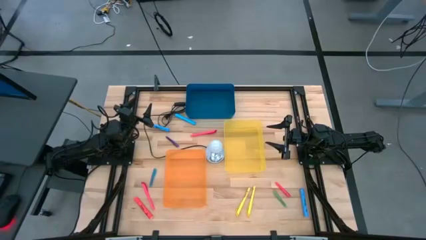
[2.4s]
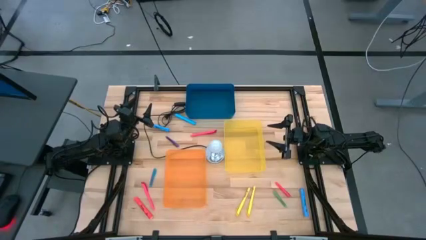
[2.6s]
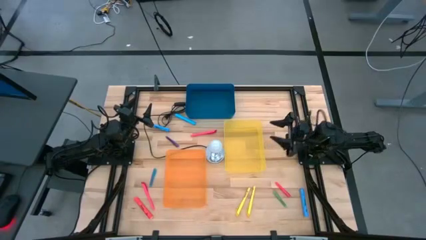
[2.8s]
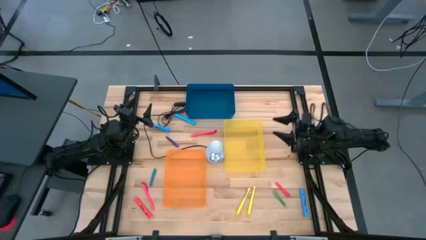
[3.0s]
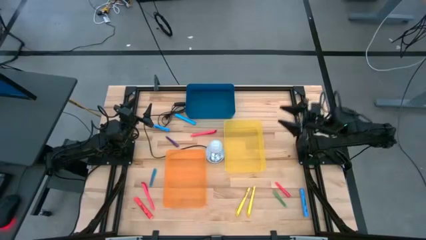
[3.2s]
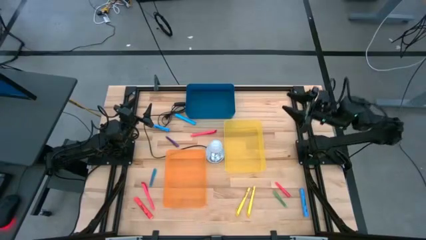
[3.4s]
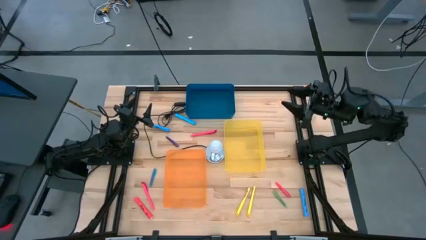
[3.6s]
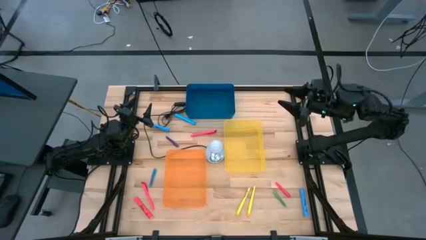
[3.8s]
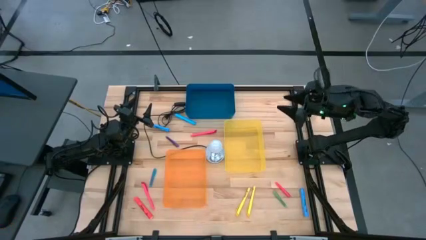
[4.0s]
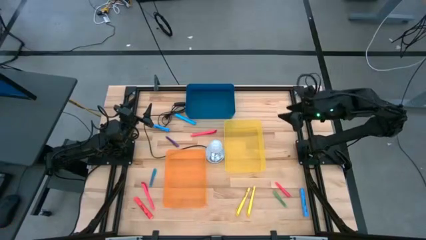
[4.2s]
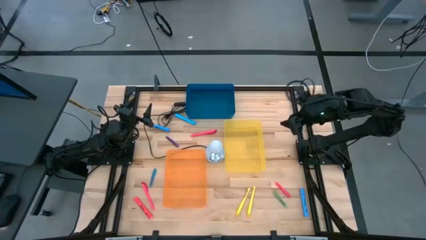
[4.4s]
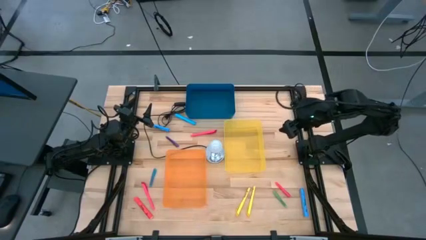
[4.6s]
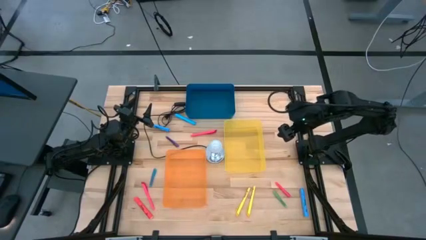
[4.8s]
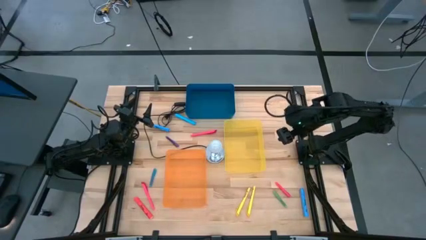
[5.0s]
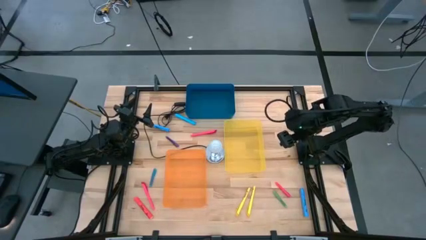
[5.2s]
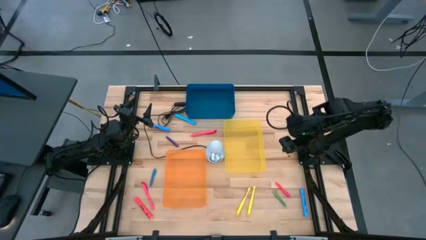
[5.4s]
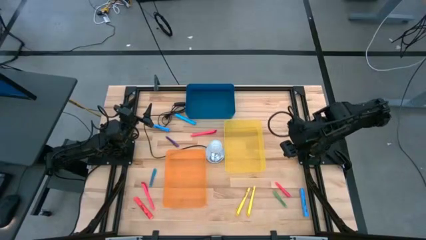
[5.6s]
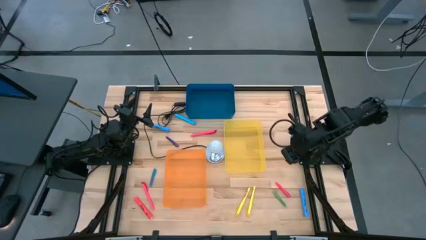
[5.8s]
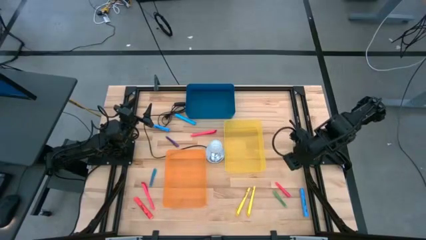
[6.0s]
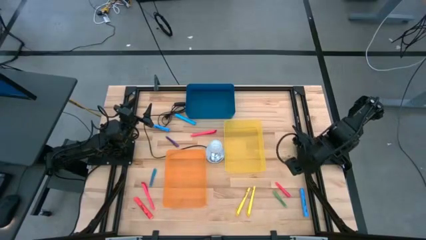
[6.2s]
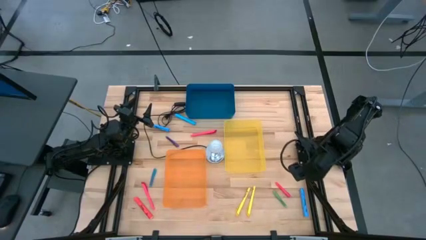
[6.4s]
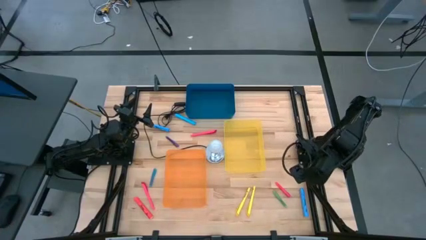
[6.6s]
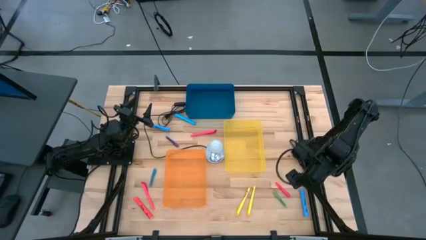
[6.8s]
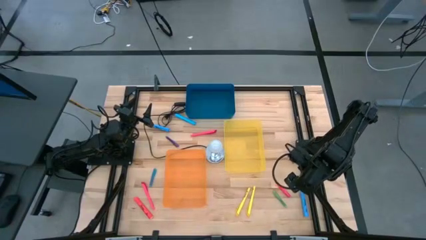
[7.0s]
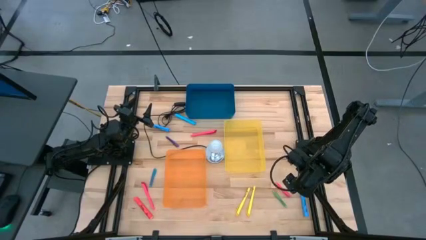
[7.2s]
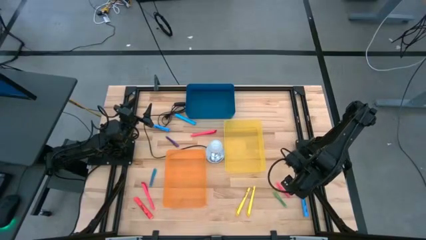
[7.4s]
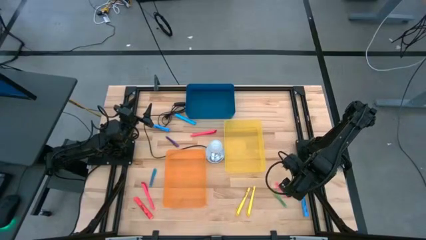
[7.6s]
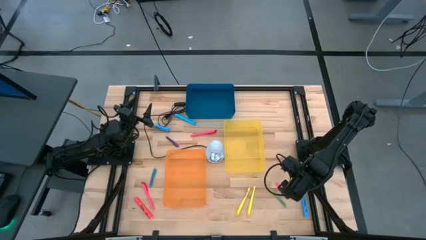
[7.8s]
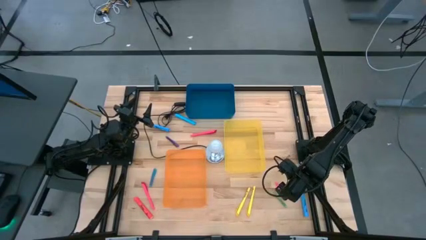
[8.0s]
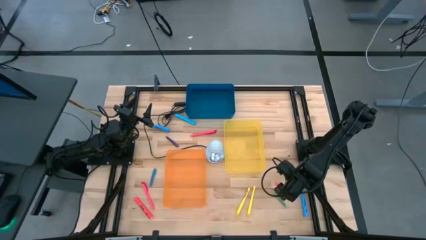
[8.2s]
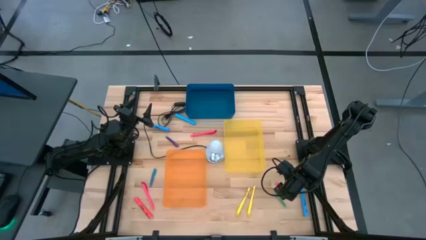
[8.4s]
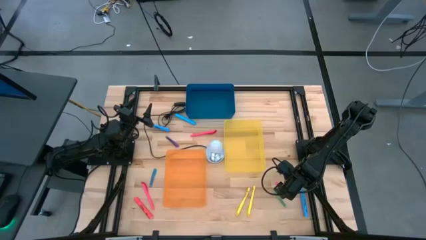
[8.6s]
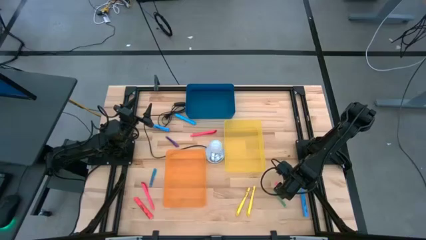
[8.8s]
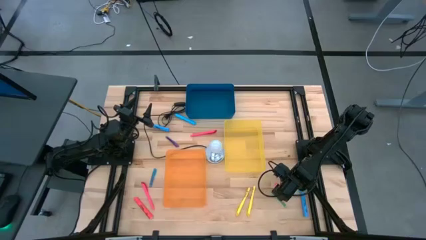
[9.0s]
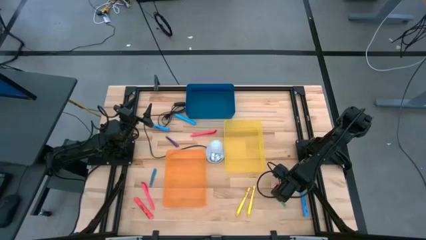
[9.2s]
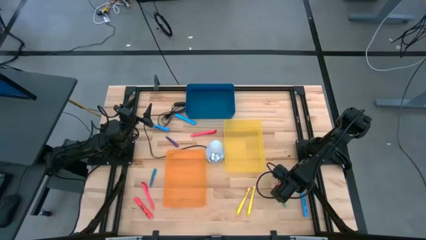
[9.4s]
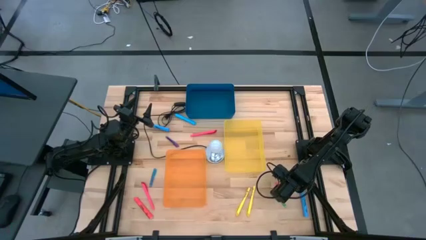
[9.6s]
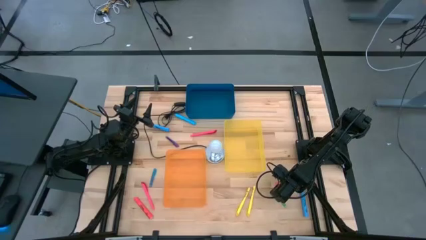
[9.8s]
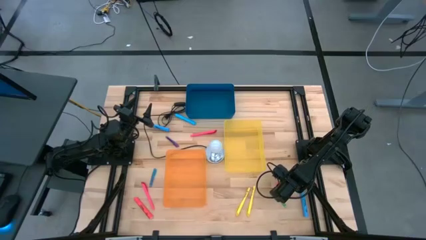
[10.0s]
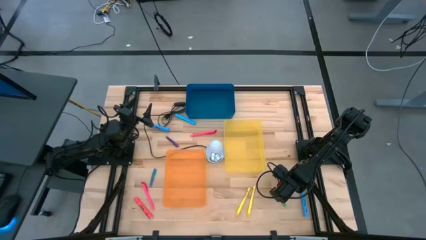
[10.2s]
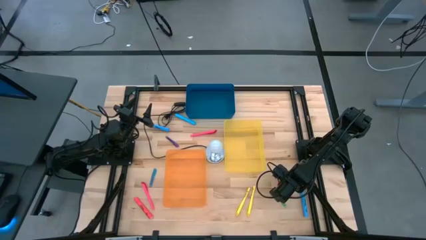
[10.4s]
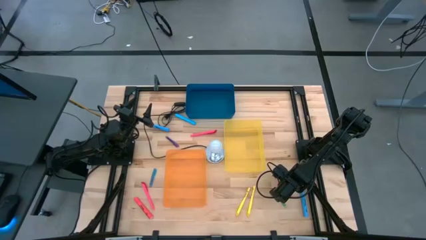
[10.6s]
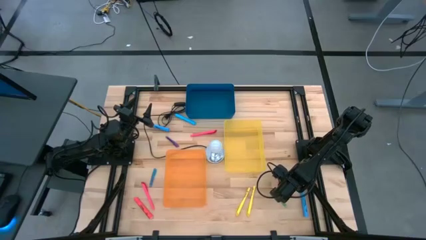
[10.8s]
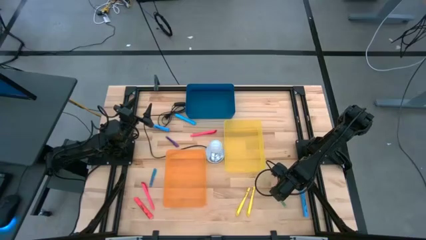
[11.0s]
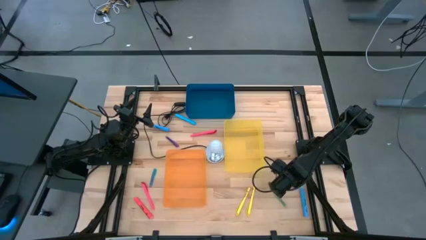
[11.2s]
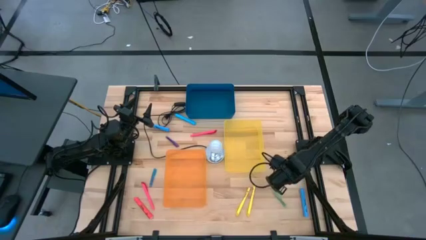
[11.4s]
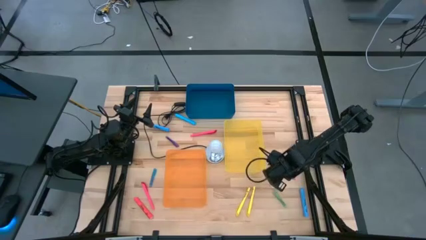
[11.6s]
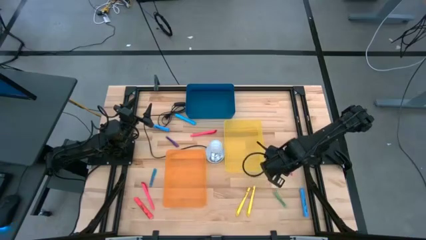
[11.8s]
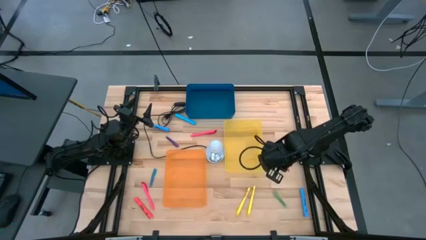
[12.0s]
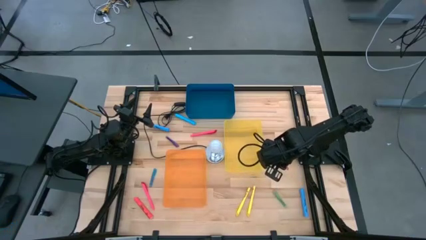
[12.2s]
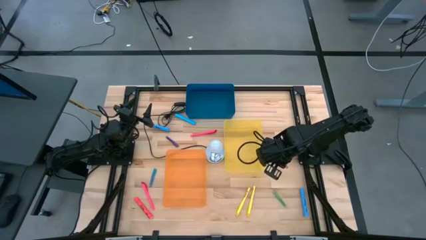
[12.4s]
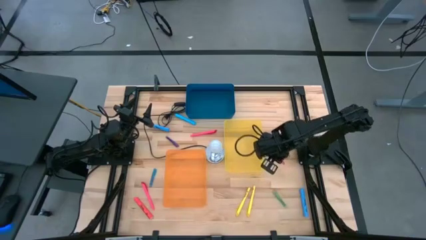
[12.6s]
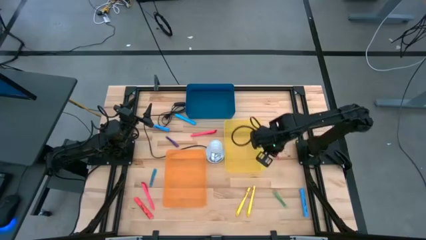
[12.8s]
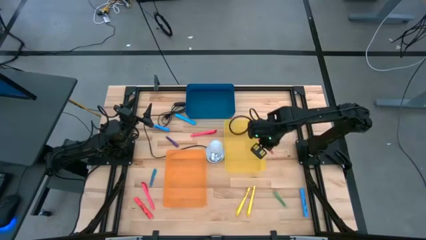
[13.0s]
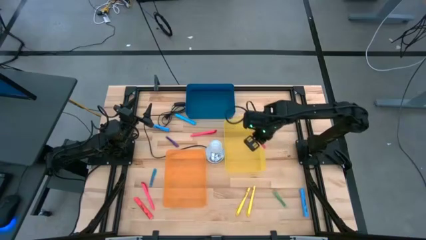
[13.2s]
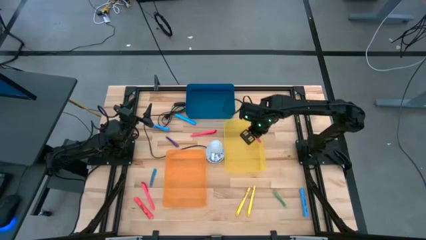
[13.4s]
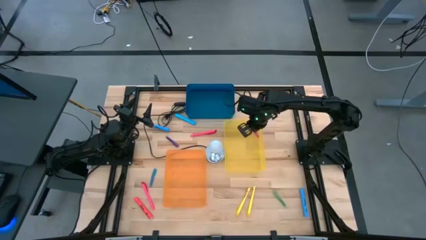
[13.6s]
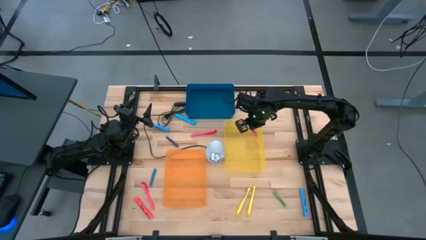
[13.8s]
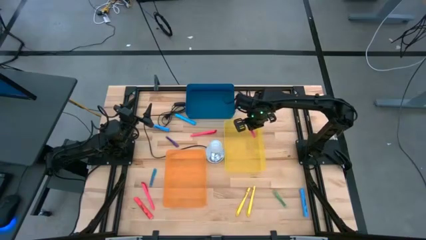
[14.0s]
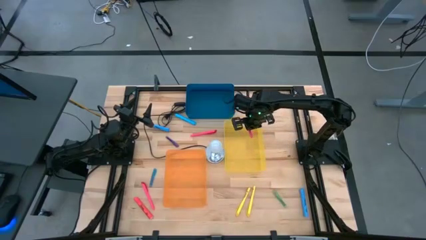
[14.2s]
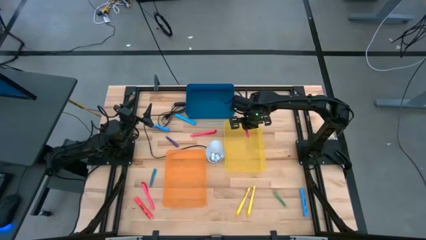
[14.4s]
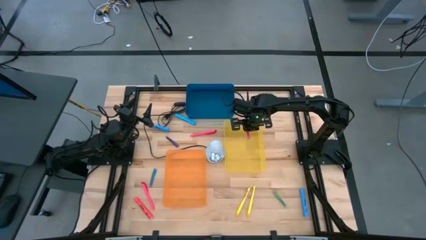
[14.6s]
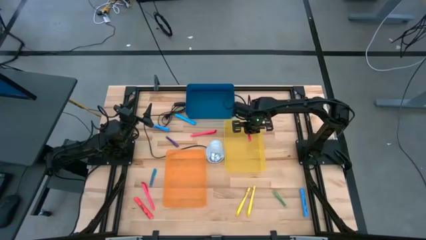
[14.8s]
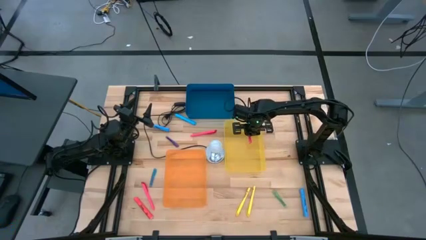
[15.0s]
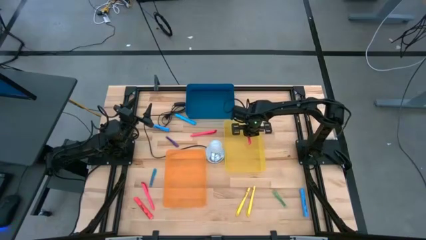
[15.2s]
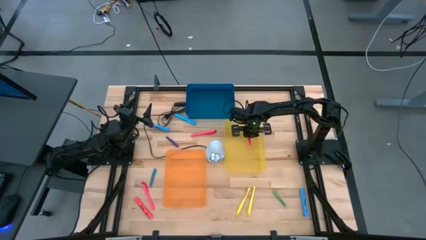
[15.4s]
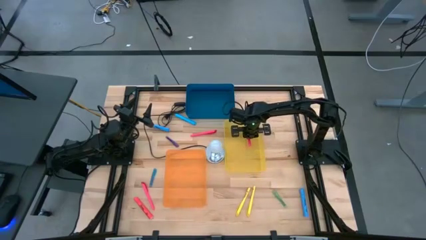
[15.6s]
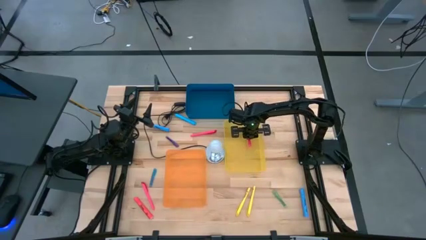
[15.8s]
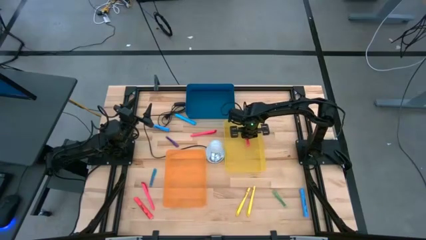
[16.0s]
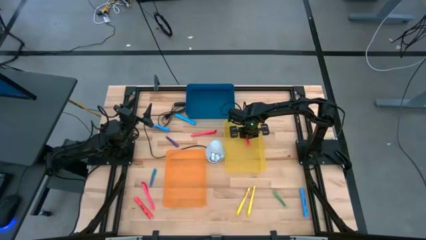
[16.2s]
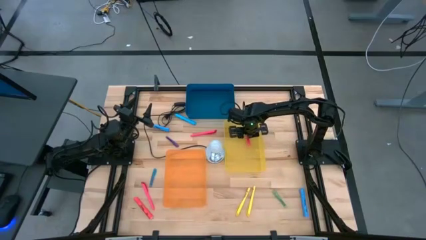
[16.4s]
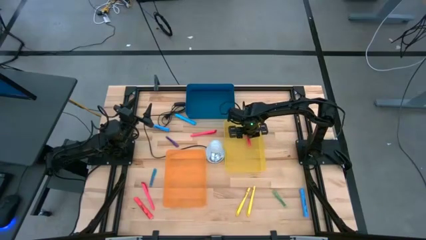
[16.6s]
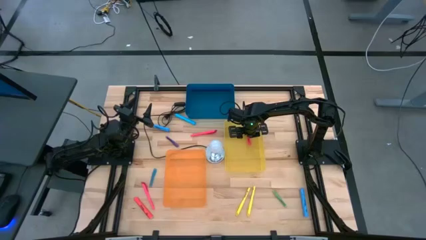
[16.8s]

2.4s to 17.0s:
Task: Pick & Place Markers
Put the small pink pen into the yellow bin
